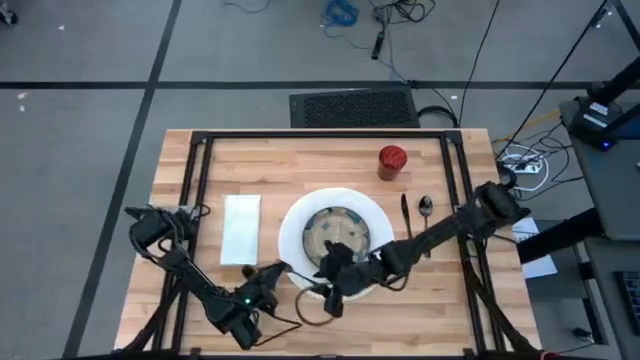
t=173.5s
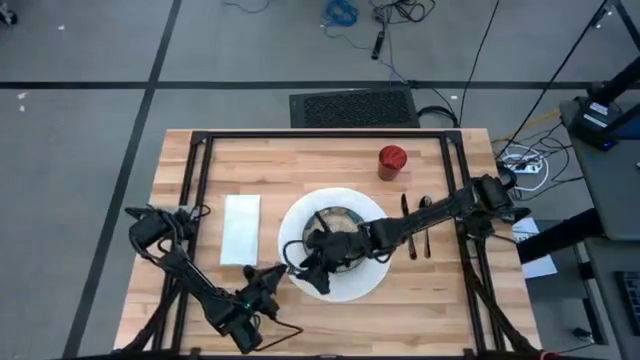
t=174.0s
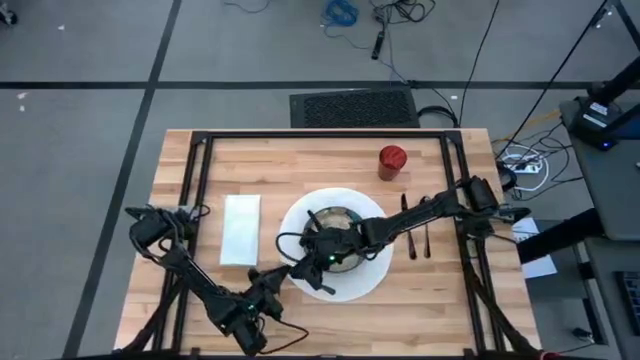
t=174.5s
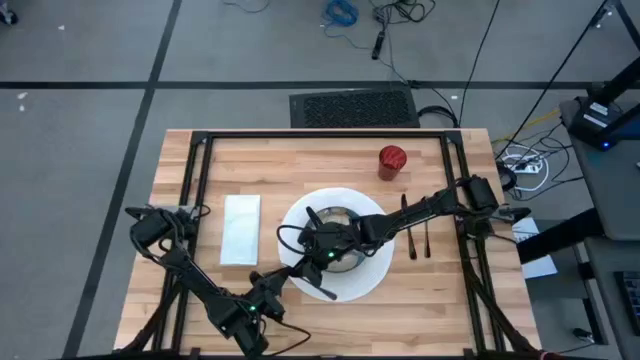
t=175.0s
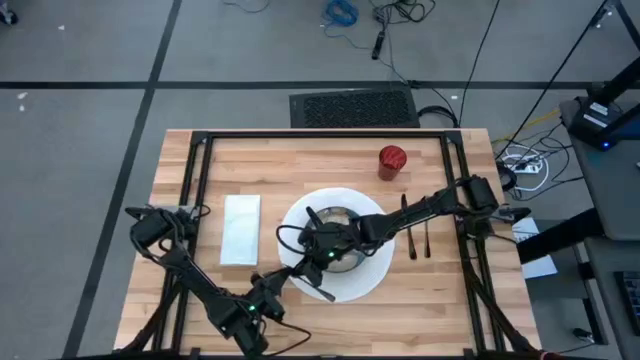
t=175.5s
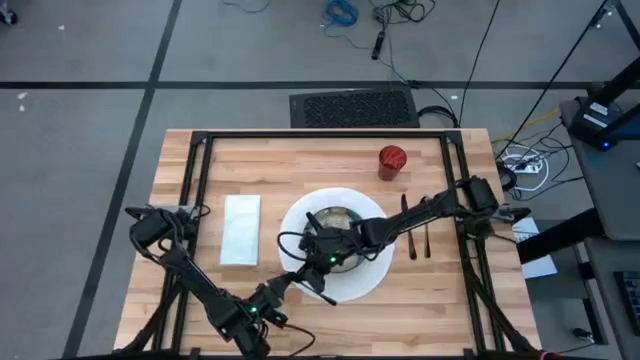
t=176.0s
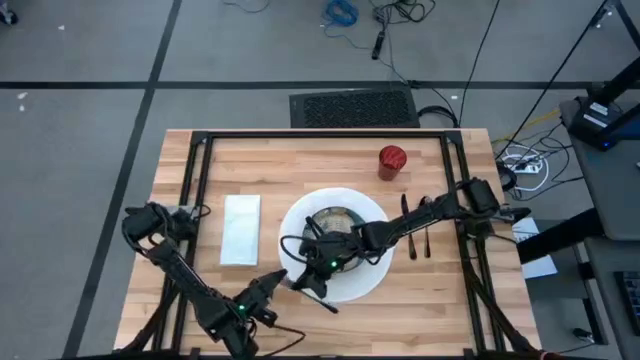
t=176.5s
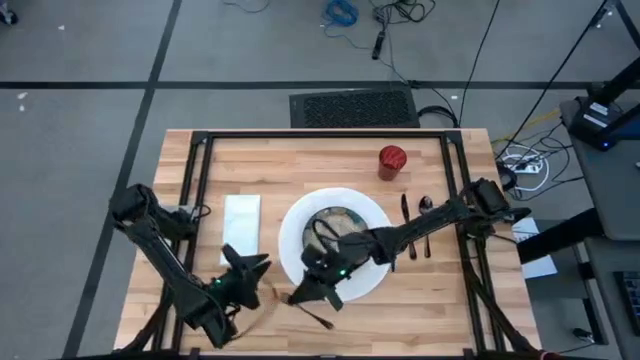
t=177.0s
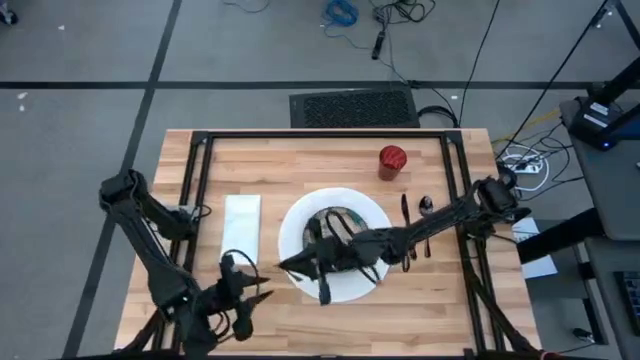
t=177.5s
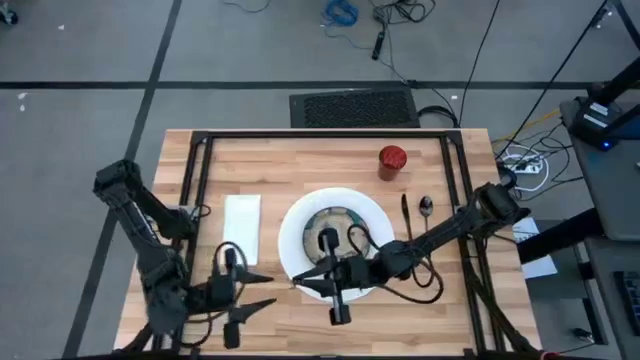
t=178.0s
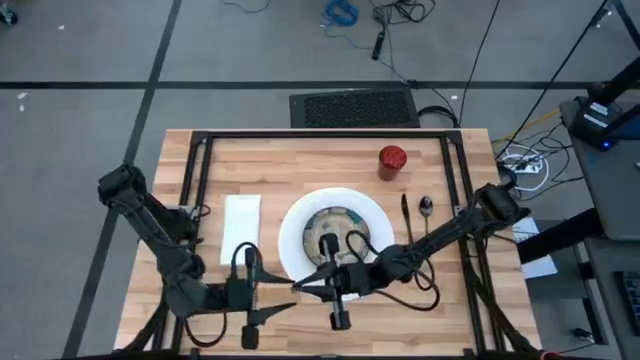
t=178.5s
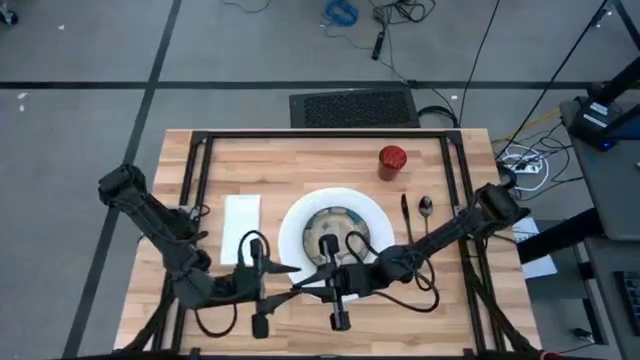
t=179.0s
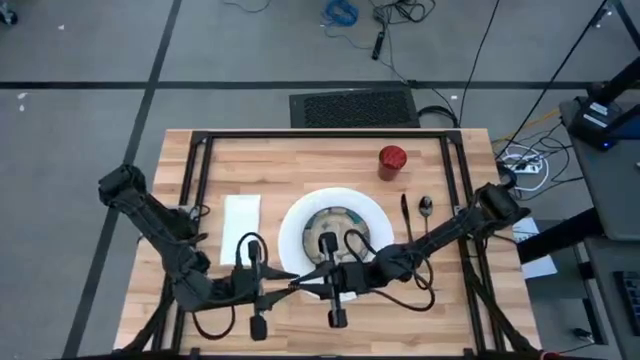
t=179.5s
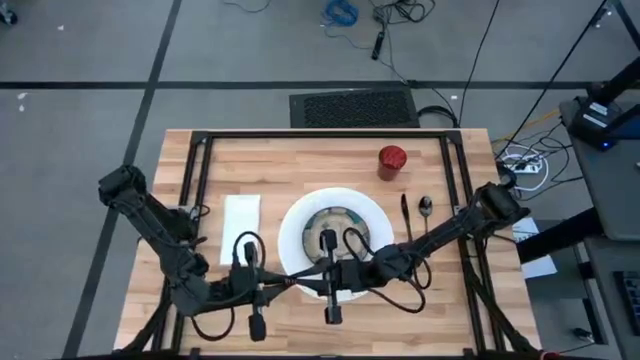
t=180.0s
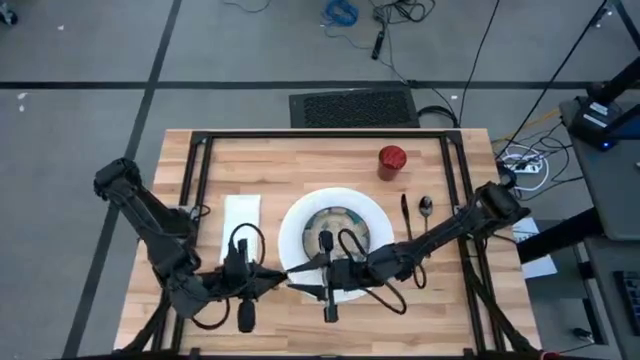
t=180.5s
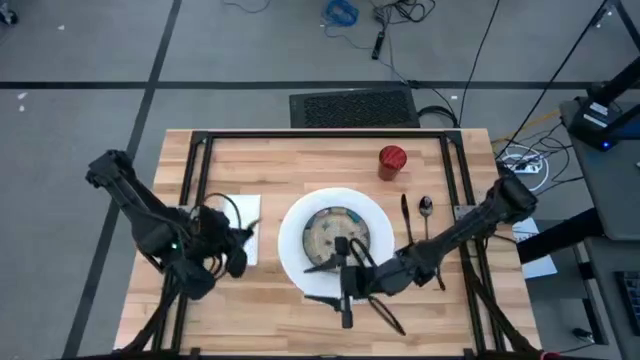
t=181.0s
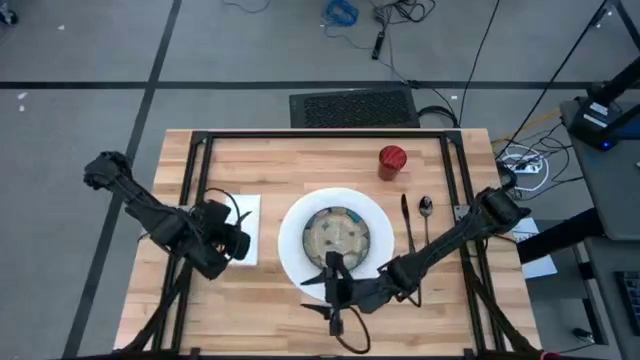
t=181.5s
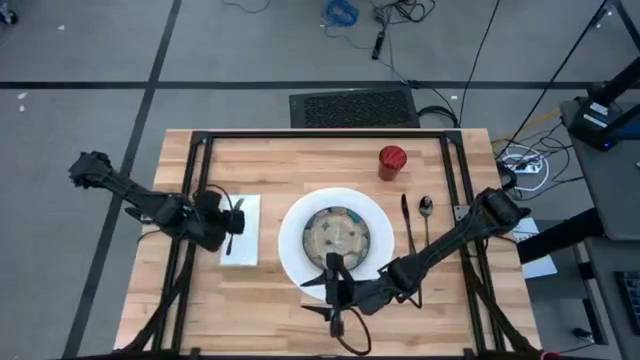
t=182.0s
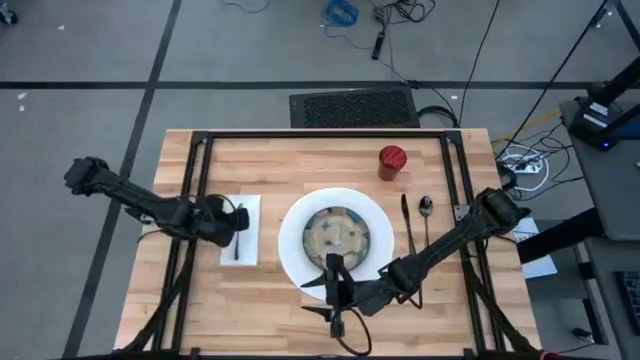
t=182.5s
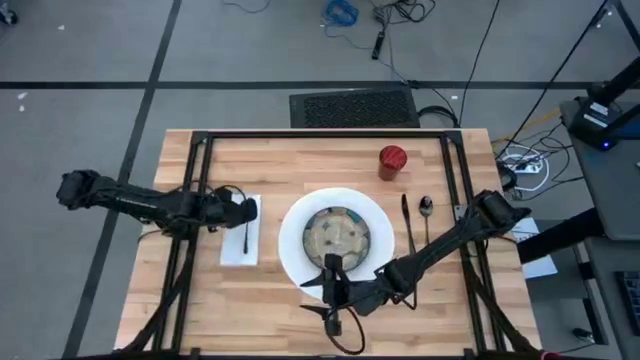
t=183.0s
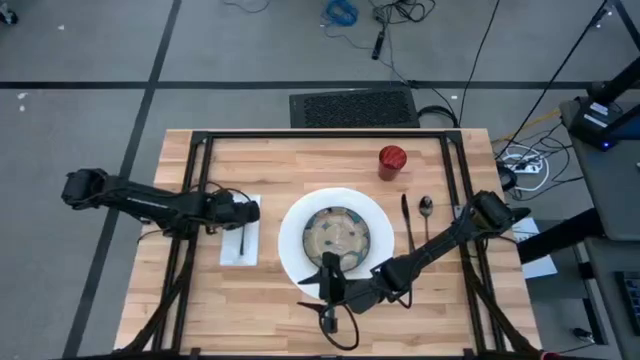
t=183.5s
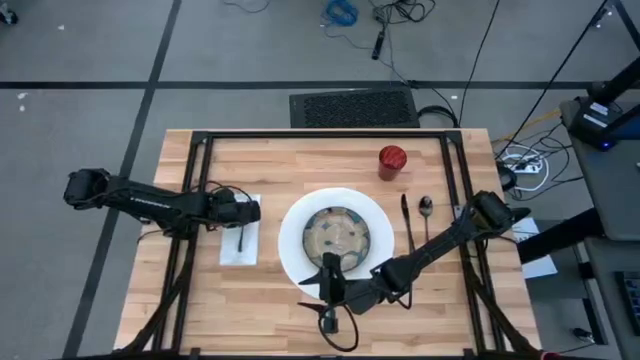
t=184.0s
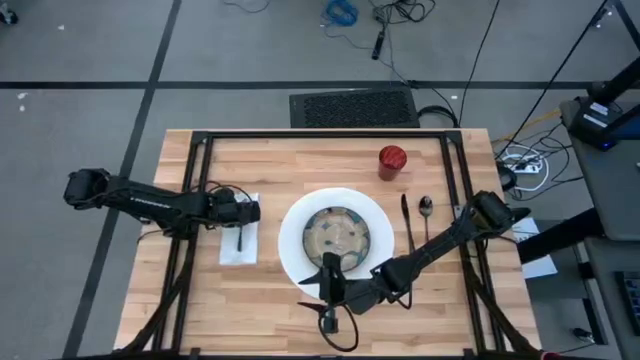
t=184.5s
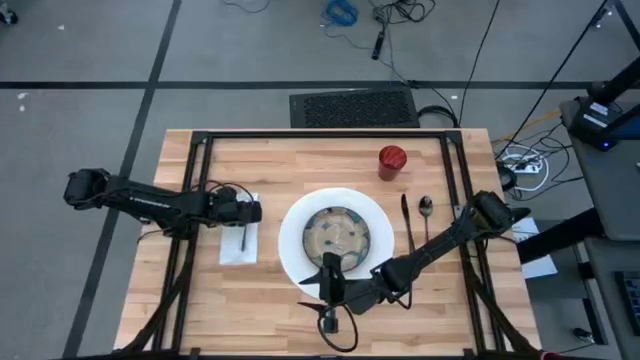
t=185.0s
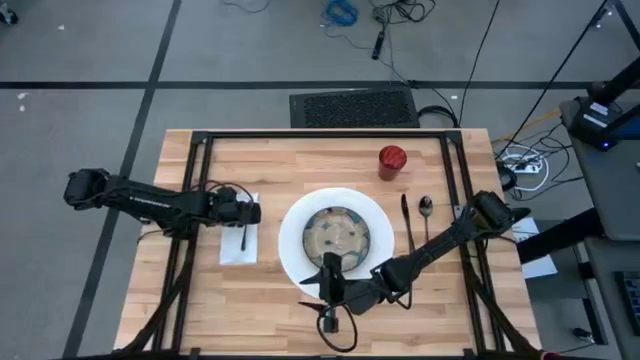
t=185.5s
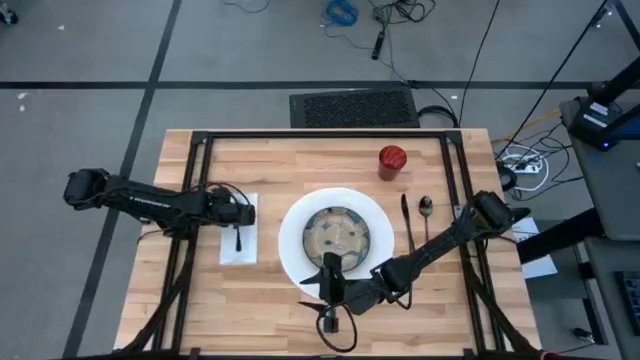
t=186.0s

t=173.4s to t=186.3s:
Task: Set table place
Put the black fork on the white napkin

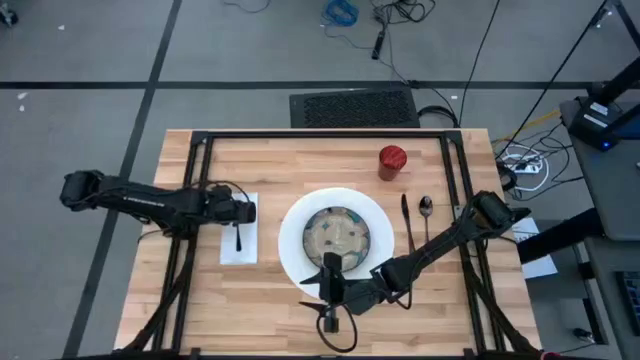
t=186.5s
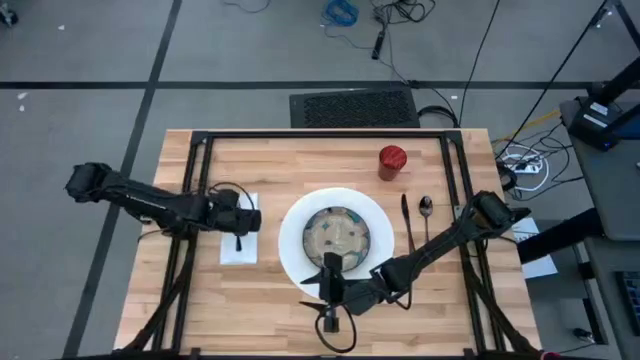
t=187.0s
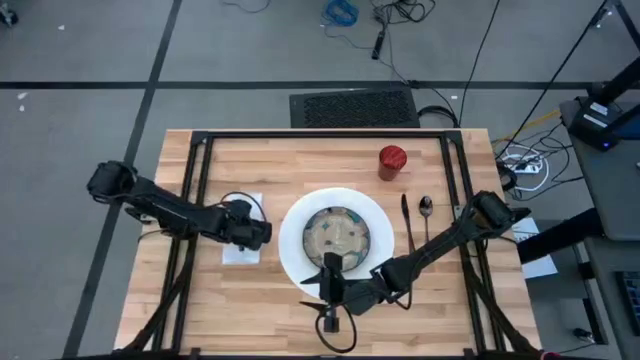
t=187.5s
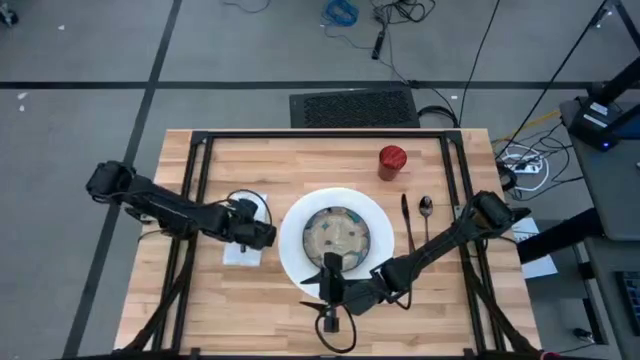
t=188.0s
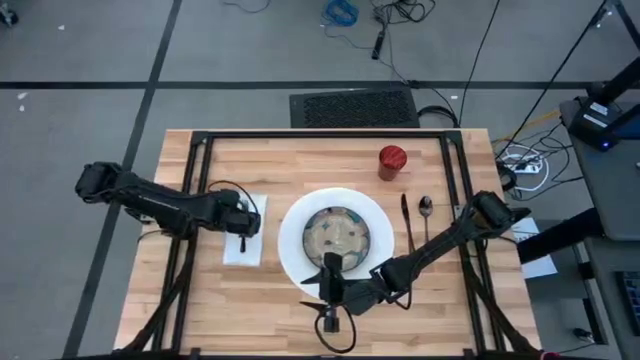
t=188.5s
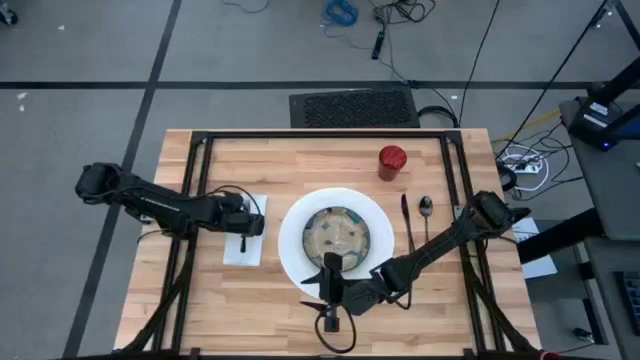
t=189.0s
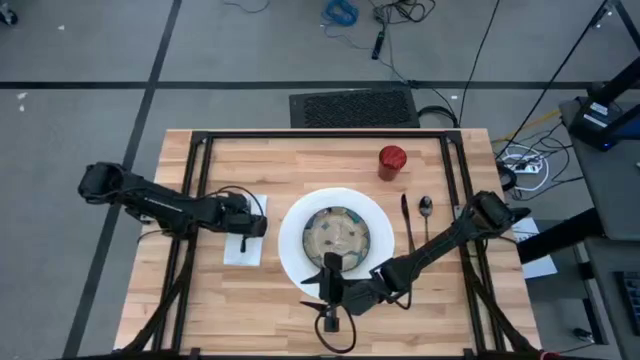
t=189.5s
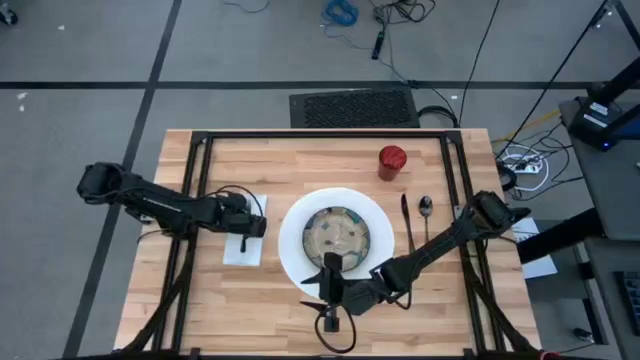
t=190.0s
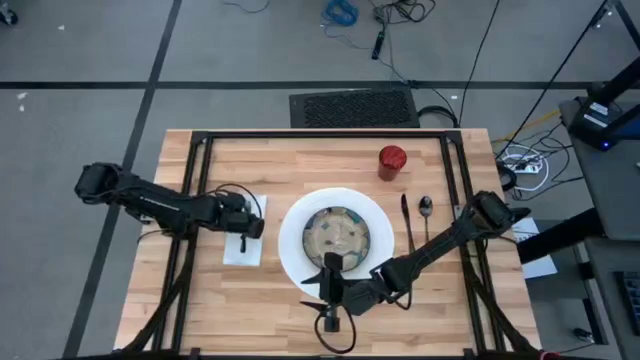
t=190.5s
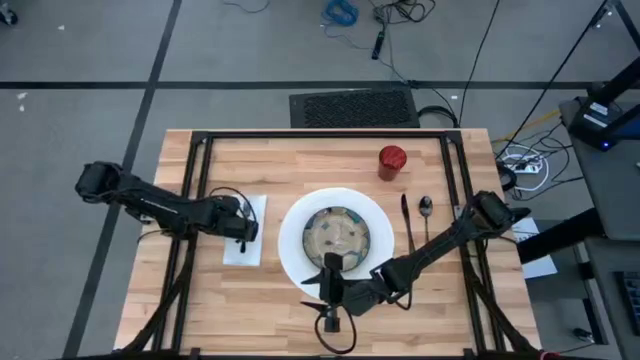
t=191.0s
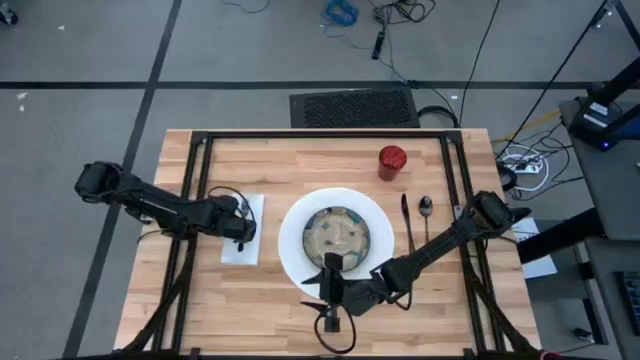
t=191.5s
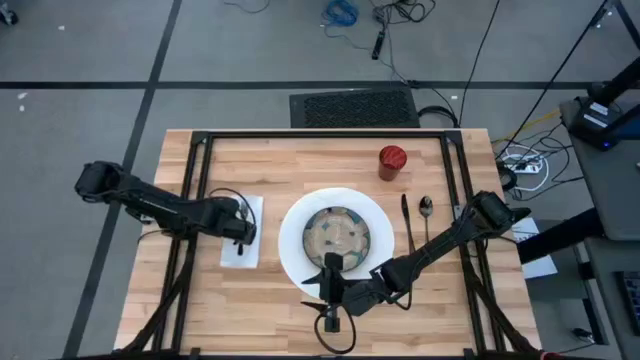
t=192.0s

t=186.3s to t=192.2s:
Adjust the white napkin

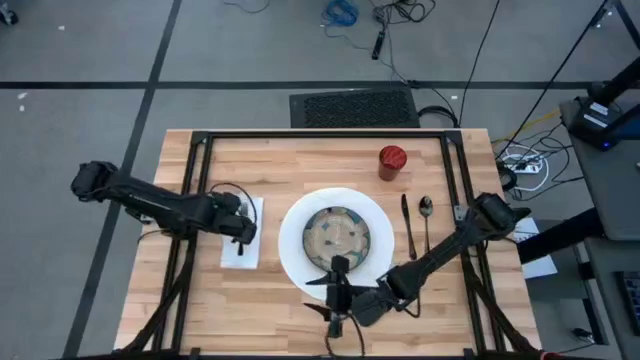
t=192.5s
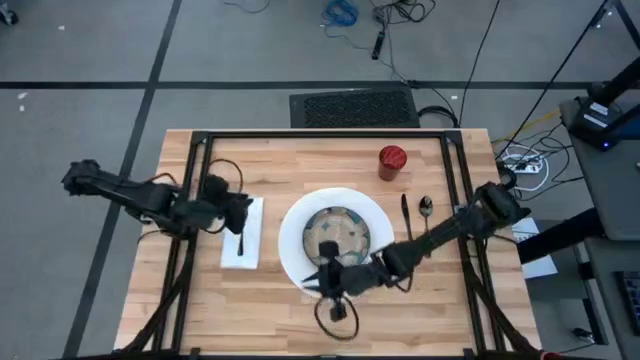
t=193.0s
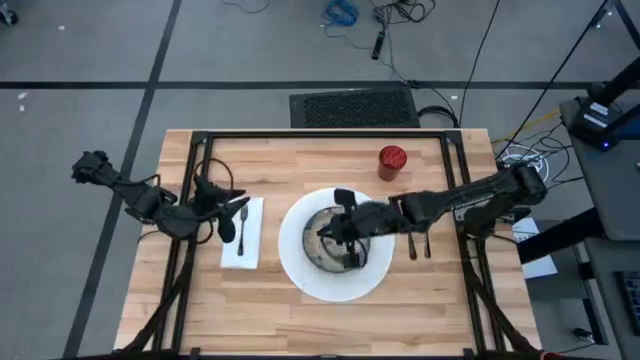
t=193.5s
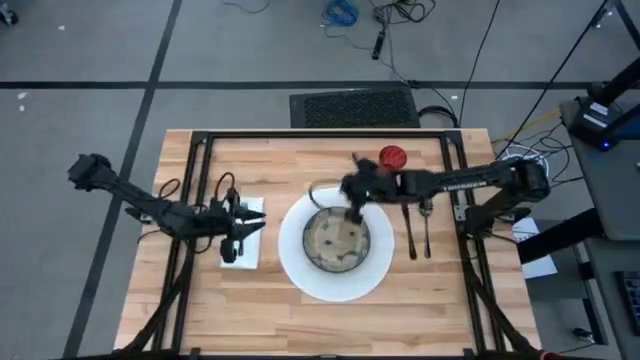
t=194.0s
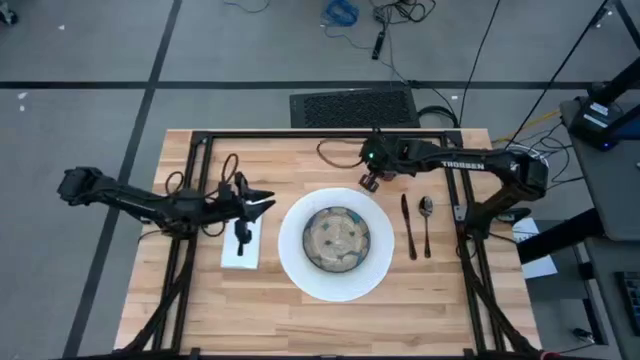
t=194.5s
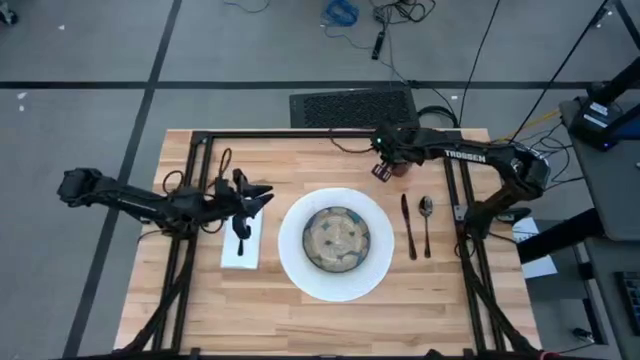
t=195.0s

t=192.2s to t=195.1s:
Adjust the red cup
